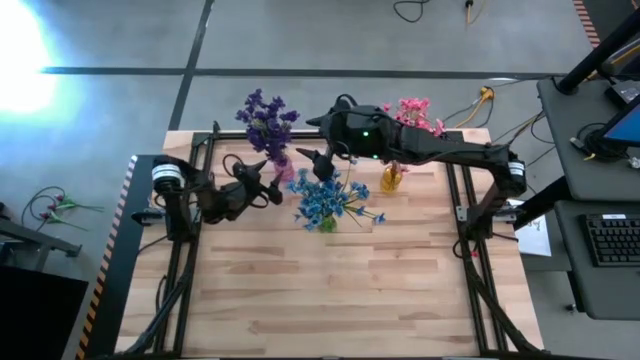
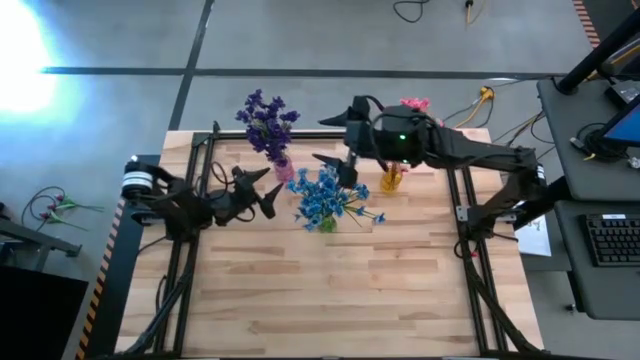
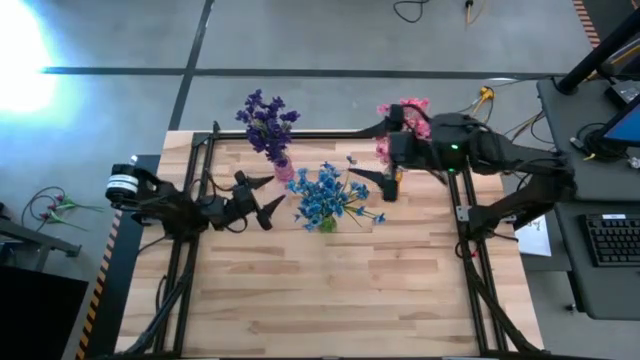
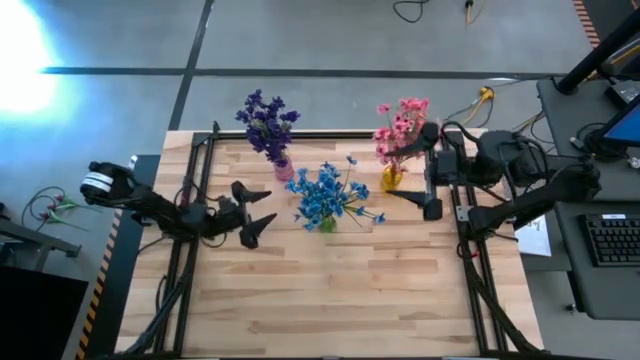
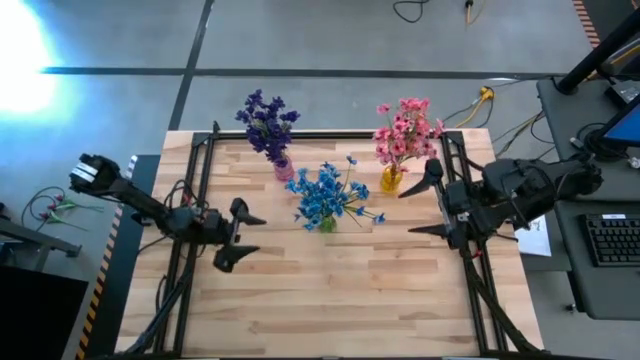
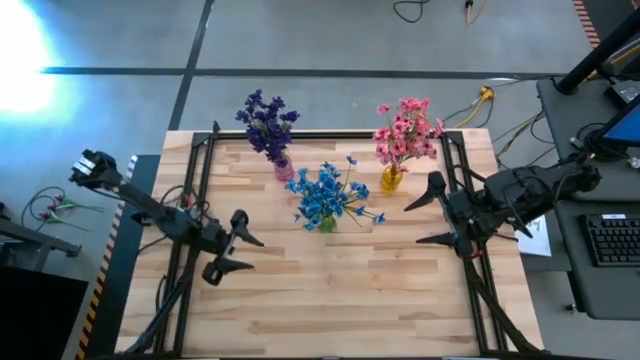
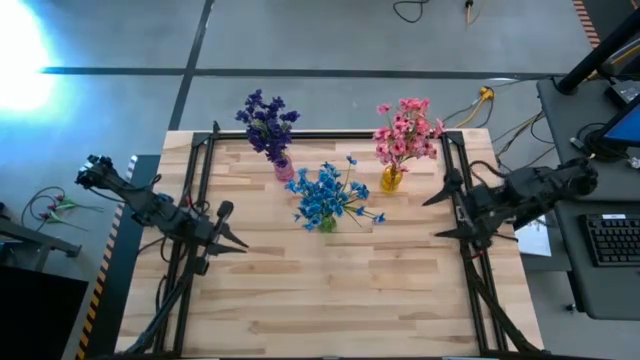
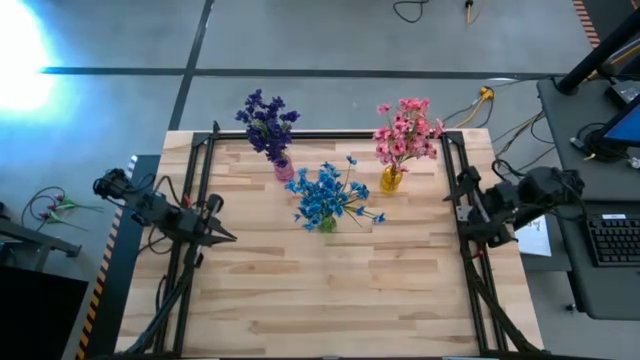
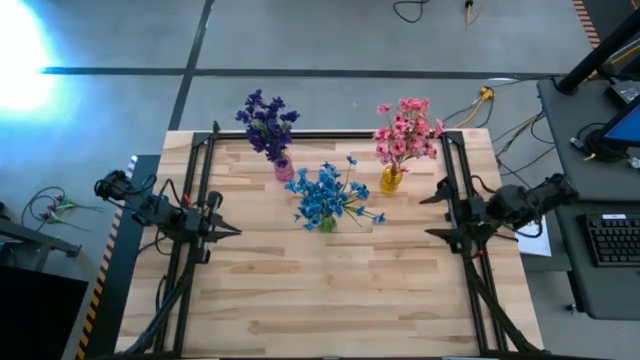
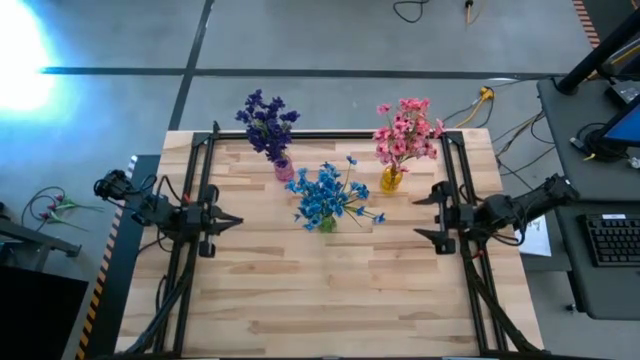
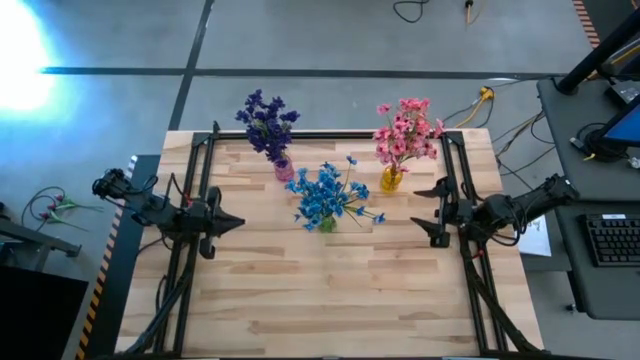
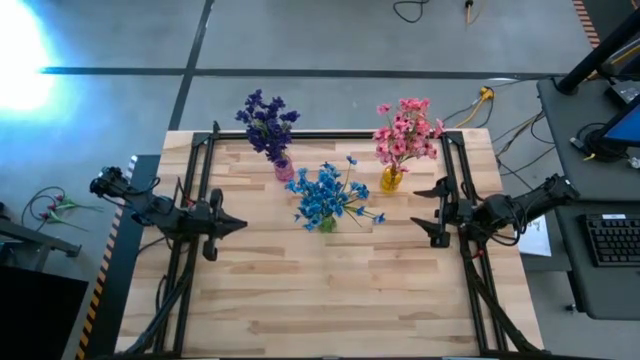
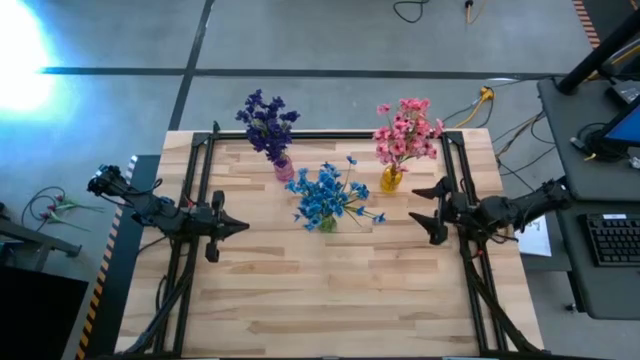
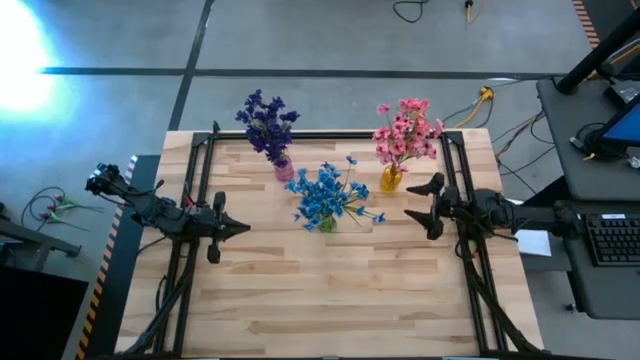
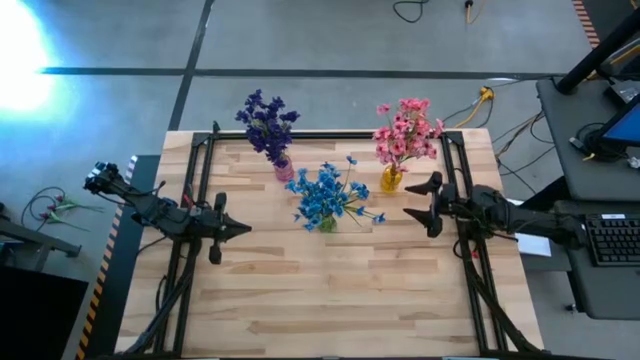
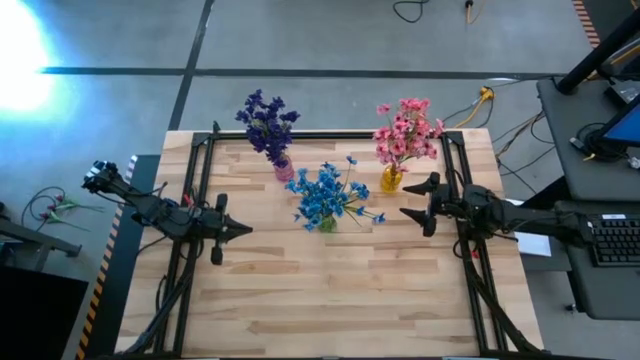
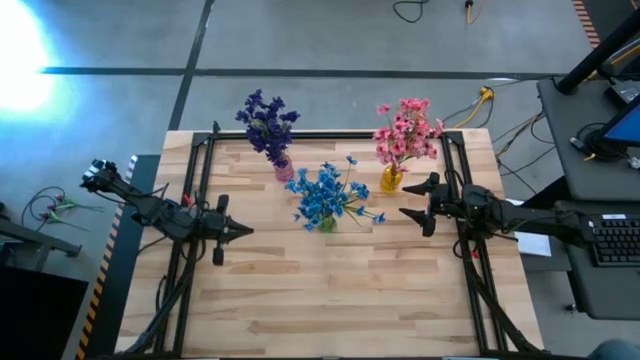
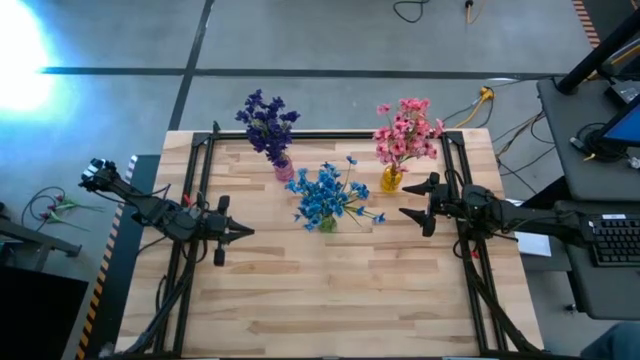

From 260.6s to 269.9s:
Task: Sort flowers into vase by color
Return to Home Position

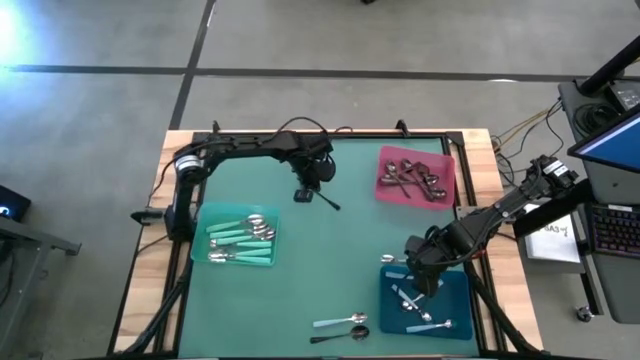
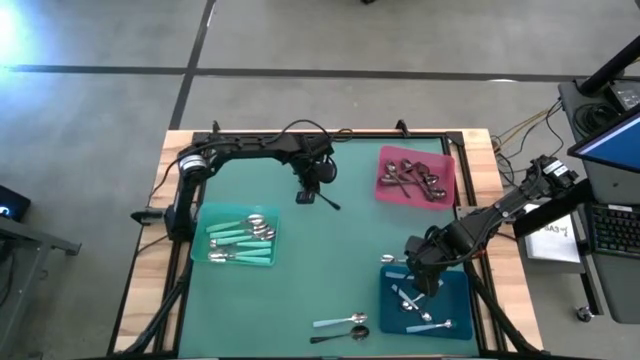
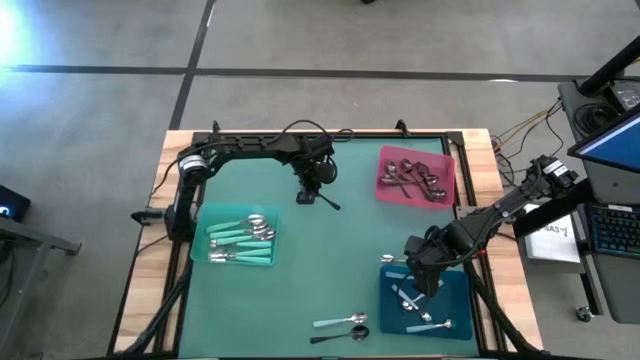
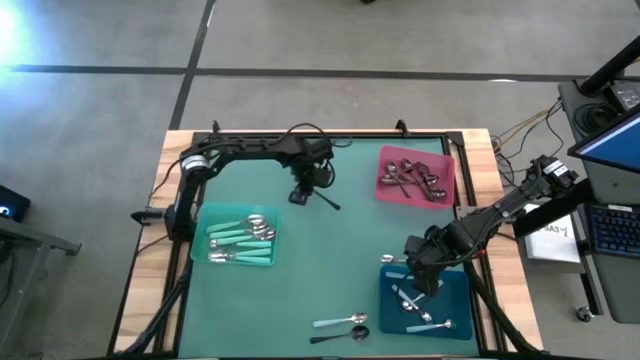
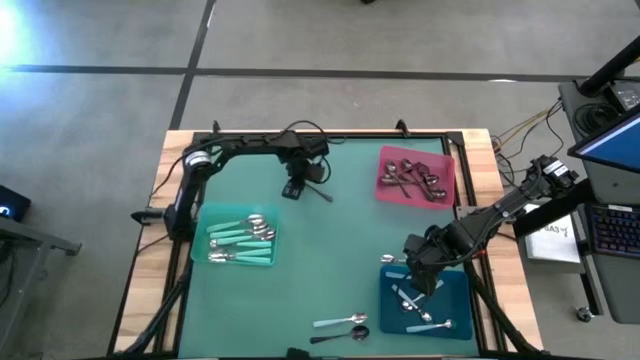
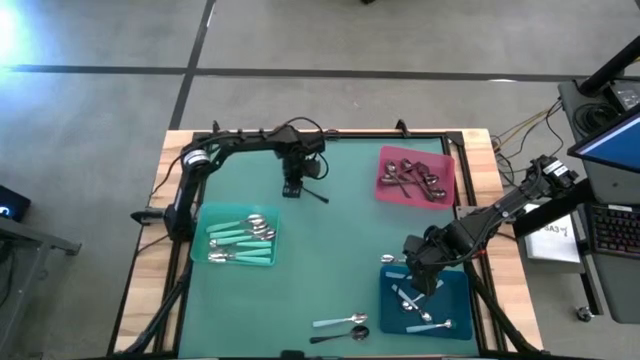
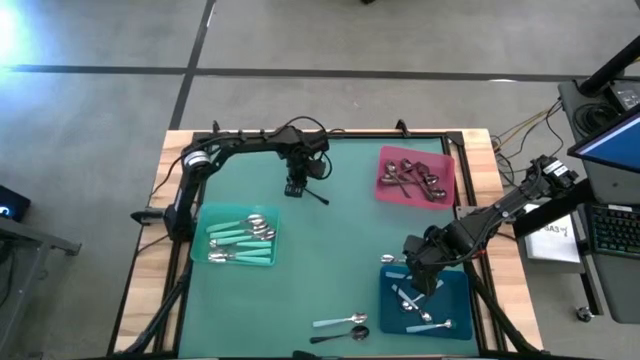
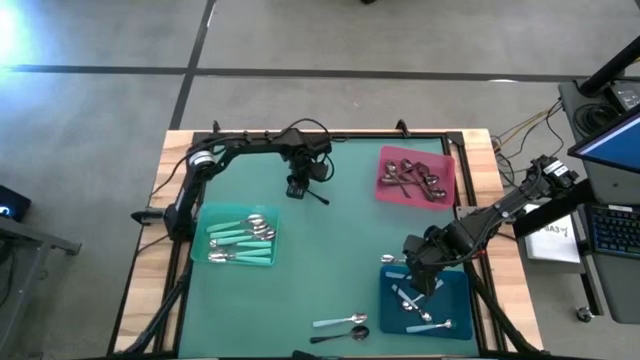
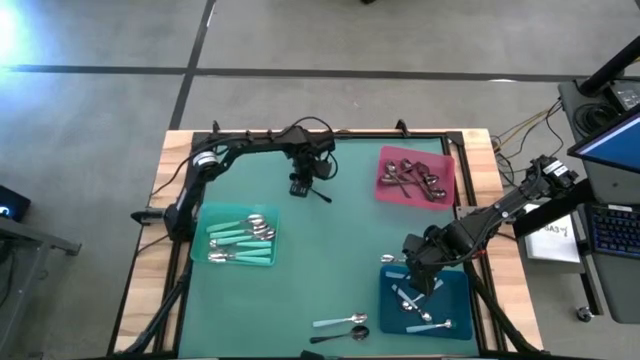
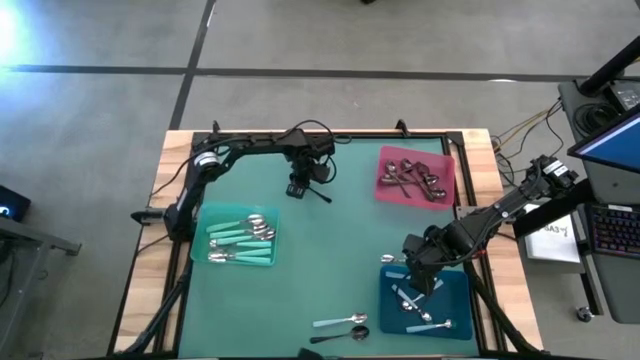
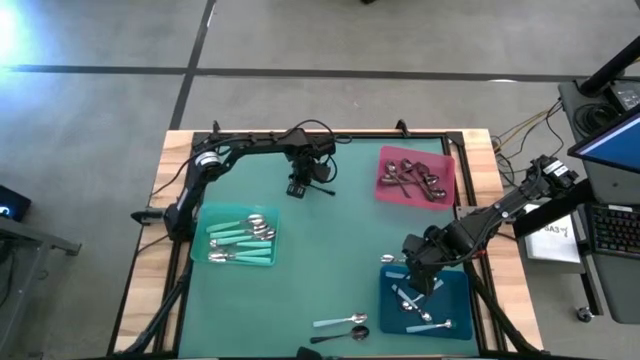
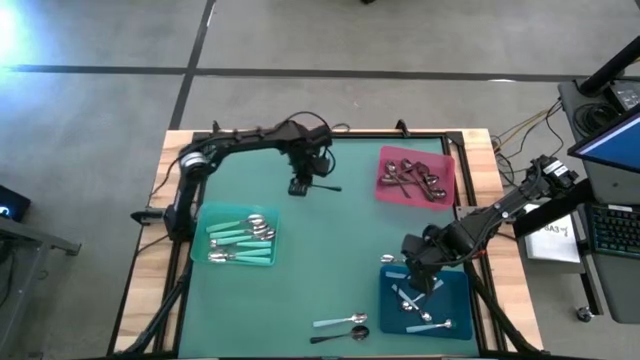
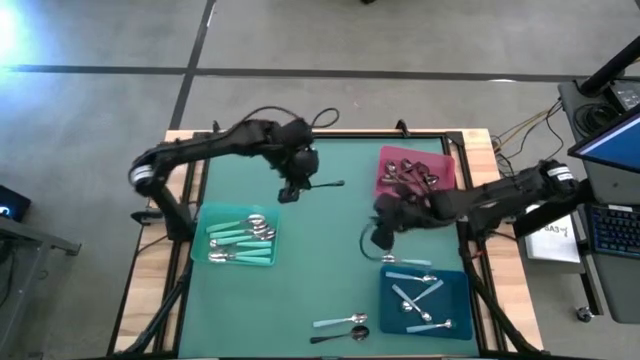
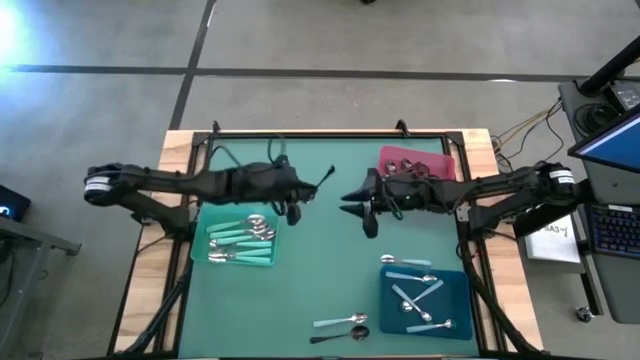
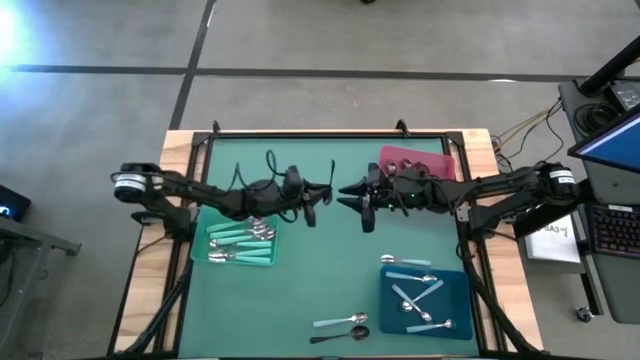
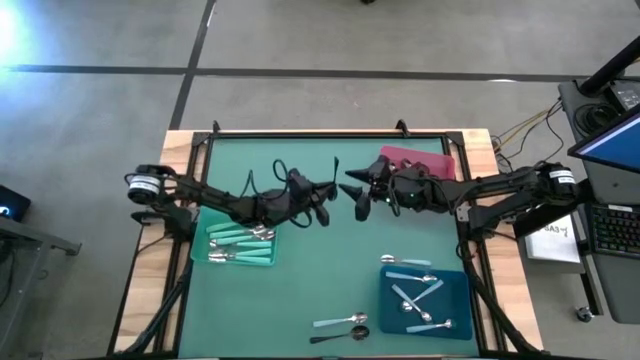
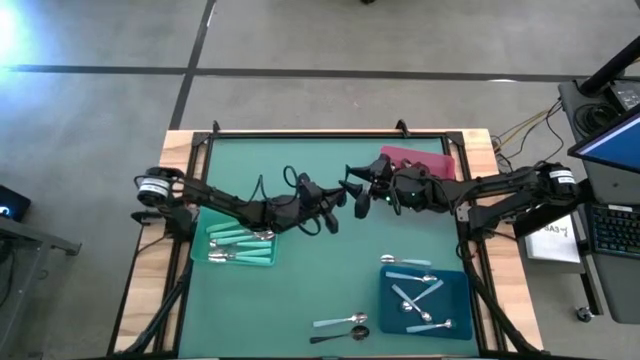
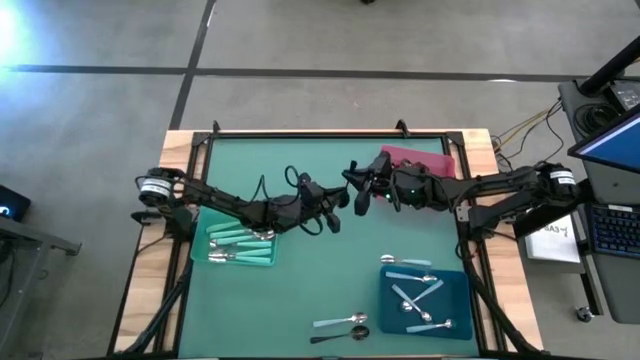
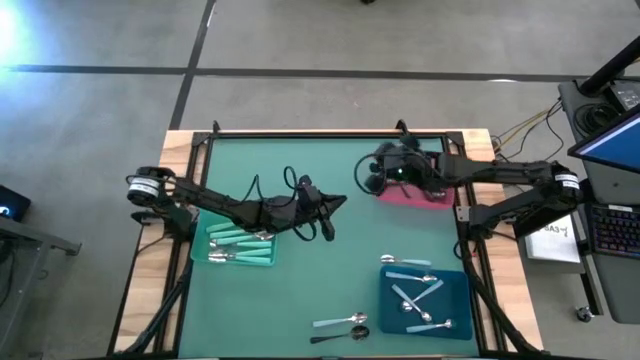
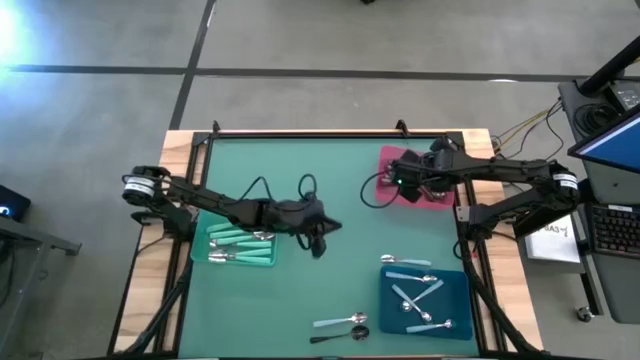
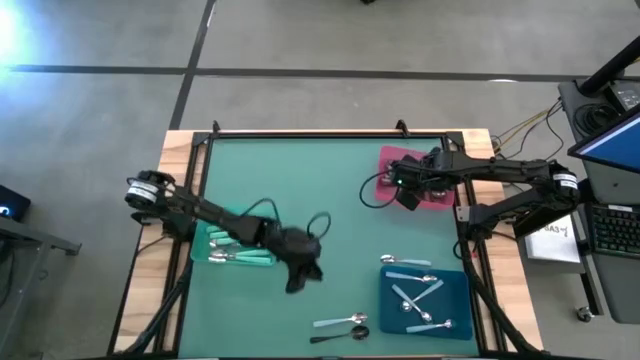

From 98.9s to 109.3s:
Task: Sort silverware by color (type)
Put the black spoon into the red bin

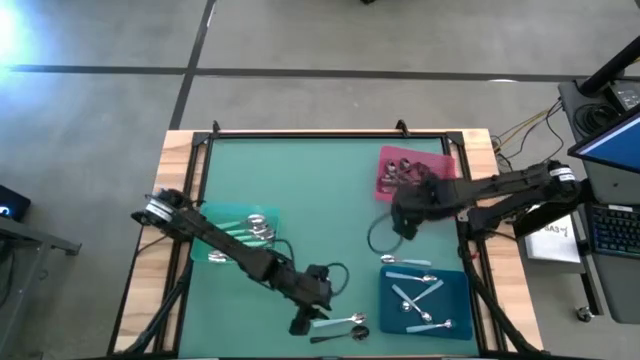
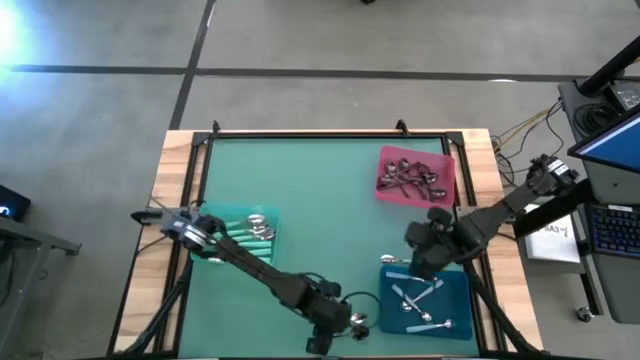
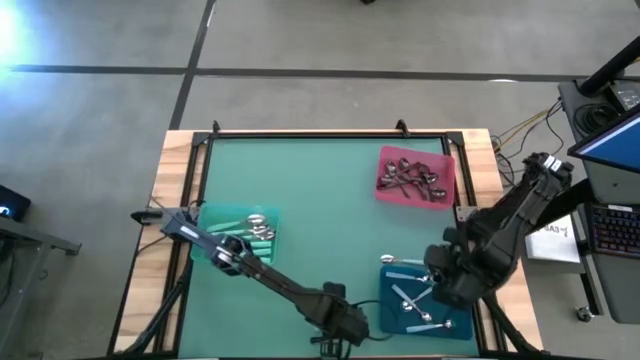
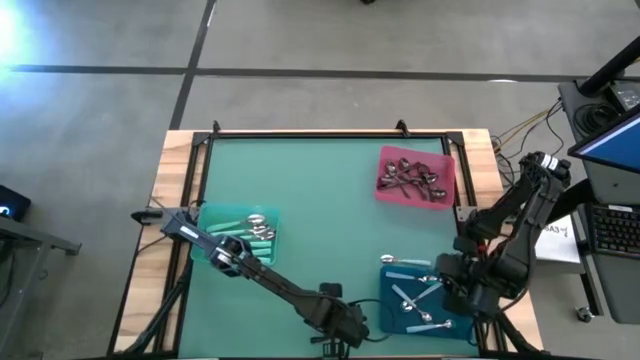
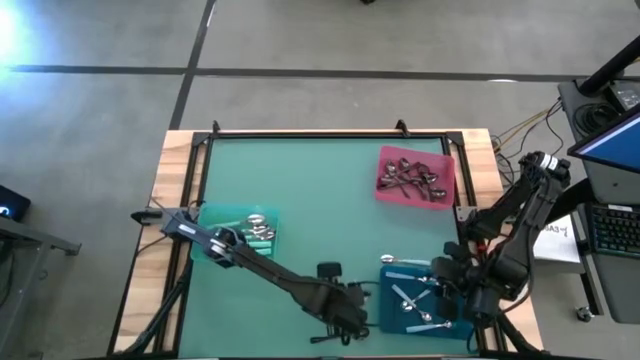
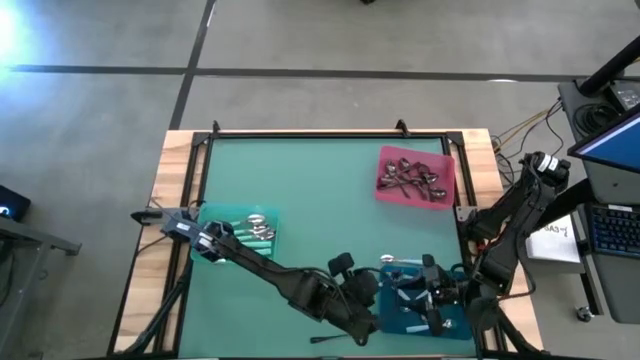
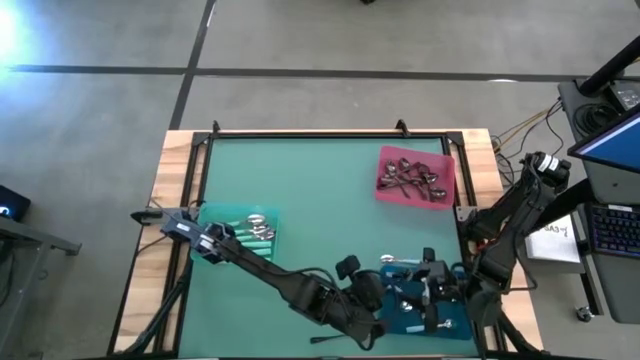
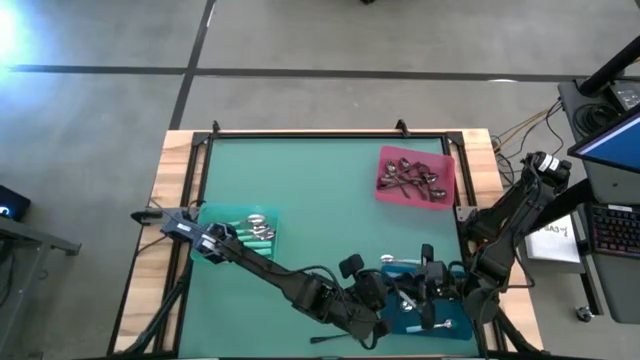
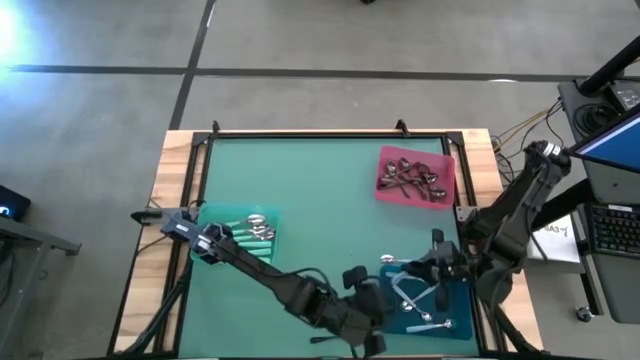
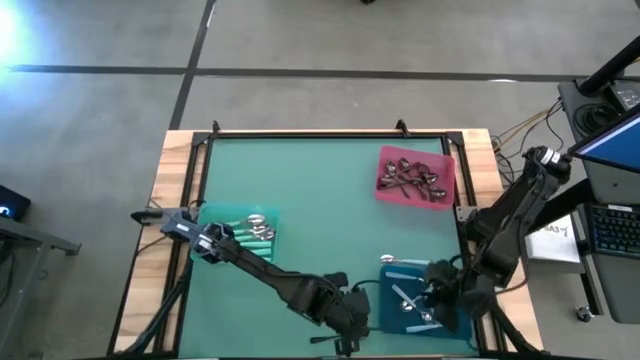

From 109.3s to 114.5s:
Put the blue spoon into the blue bin
